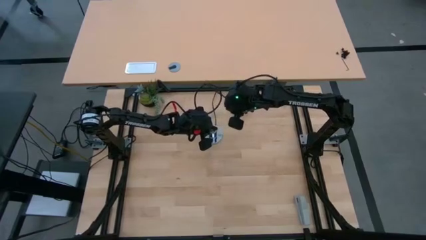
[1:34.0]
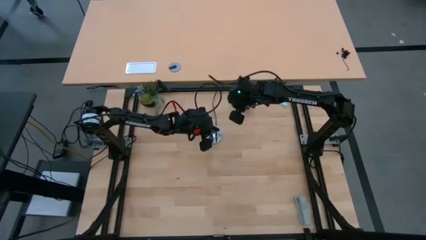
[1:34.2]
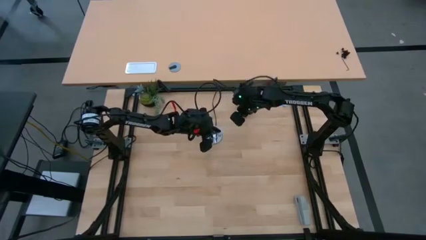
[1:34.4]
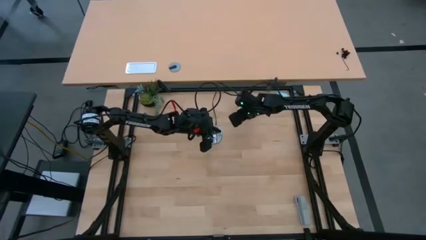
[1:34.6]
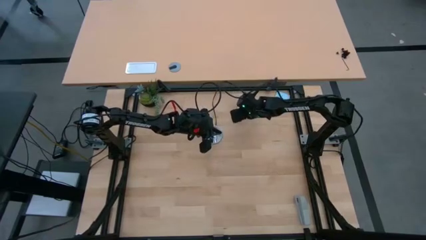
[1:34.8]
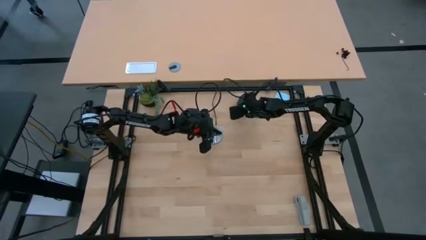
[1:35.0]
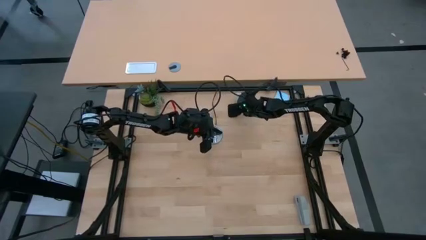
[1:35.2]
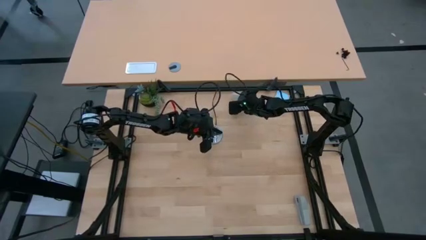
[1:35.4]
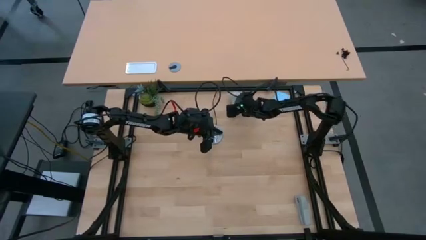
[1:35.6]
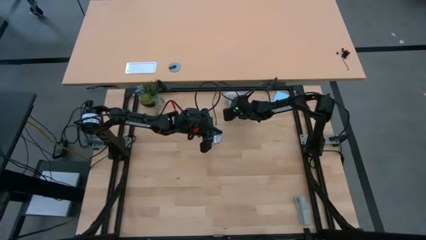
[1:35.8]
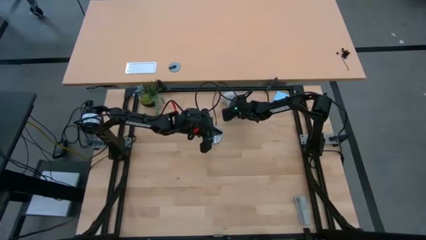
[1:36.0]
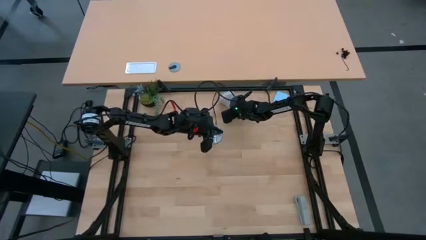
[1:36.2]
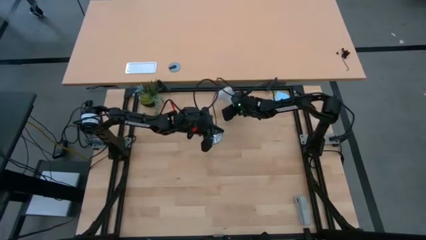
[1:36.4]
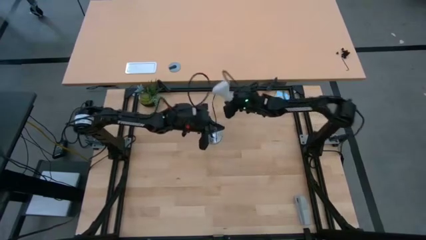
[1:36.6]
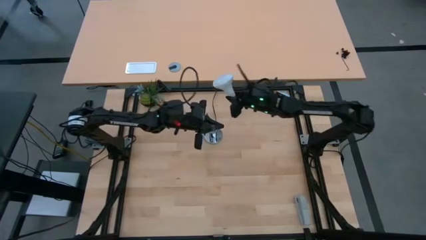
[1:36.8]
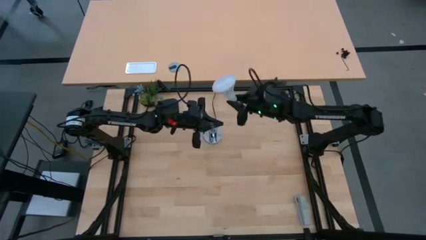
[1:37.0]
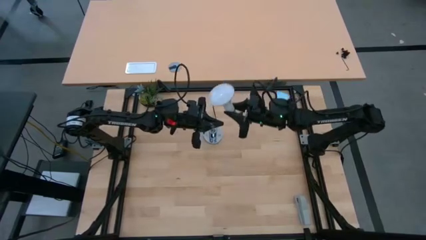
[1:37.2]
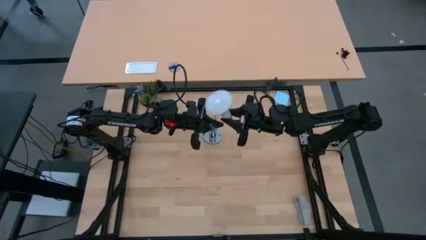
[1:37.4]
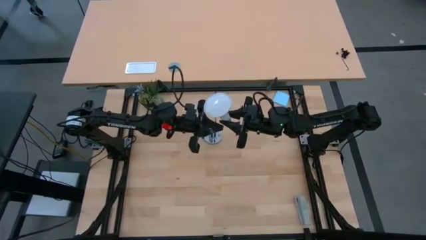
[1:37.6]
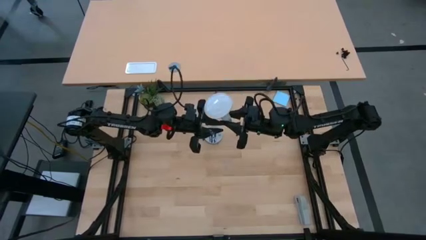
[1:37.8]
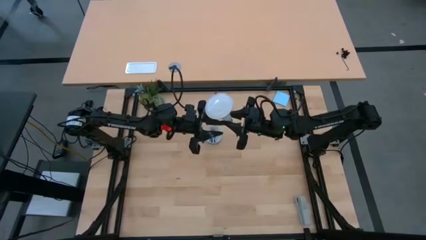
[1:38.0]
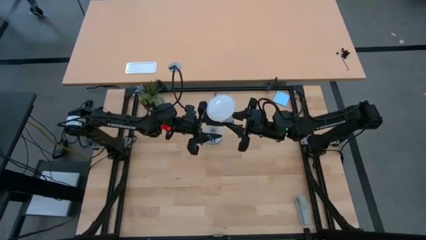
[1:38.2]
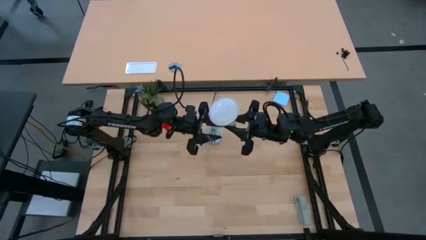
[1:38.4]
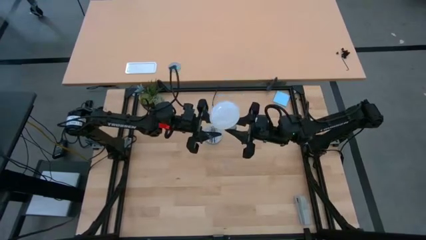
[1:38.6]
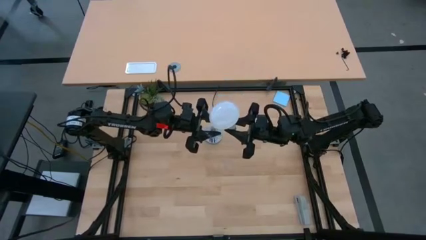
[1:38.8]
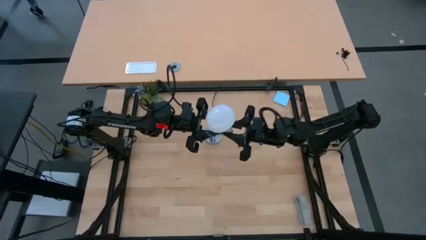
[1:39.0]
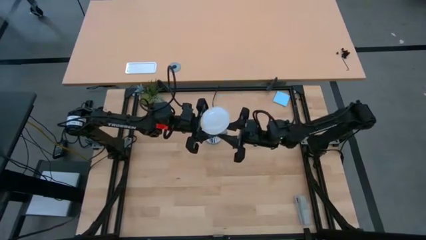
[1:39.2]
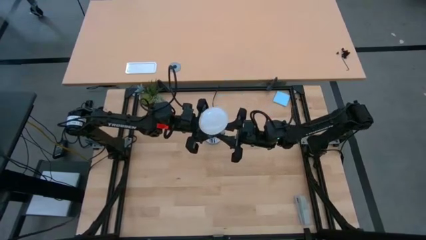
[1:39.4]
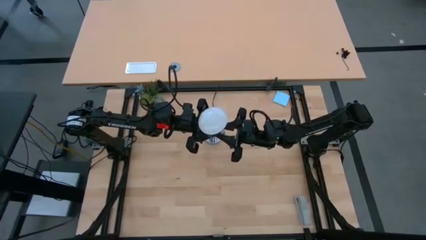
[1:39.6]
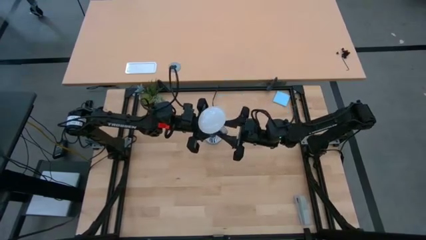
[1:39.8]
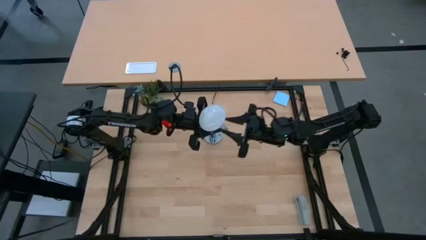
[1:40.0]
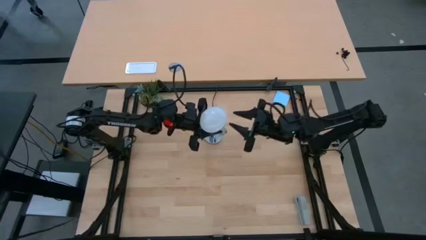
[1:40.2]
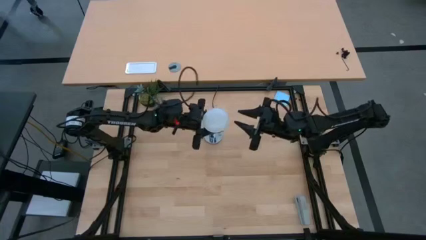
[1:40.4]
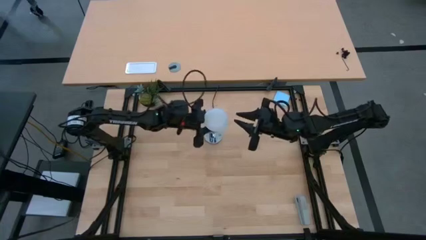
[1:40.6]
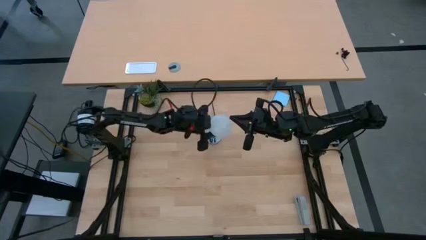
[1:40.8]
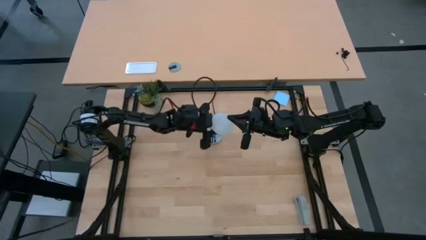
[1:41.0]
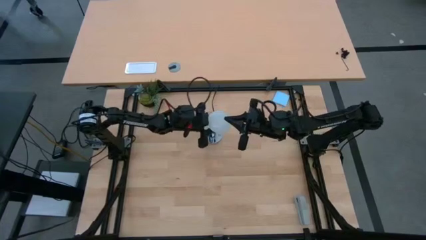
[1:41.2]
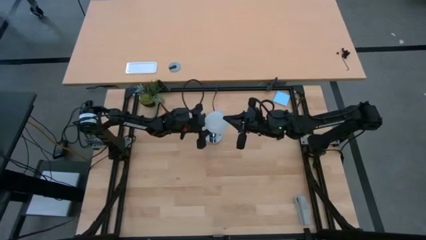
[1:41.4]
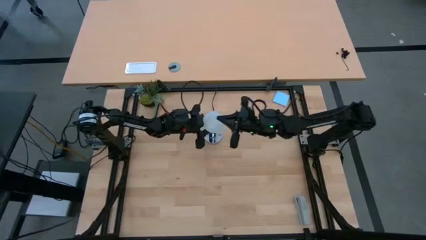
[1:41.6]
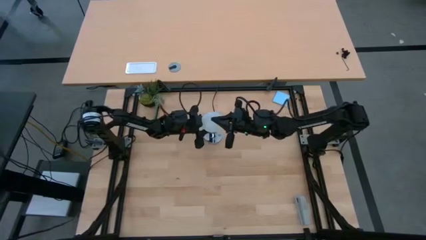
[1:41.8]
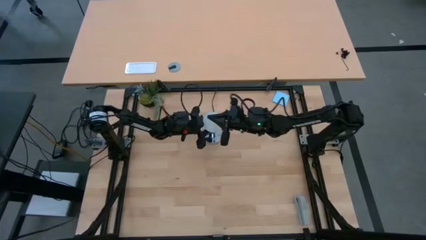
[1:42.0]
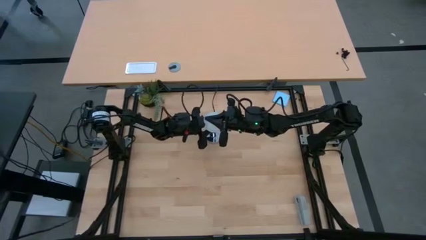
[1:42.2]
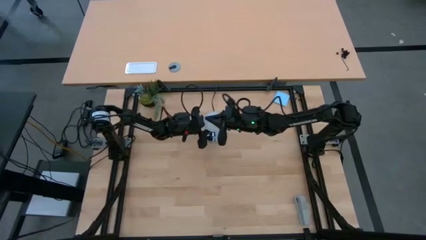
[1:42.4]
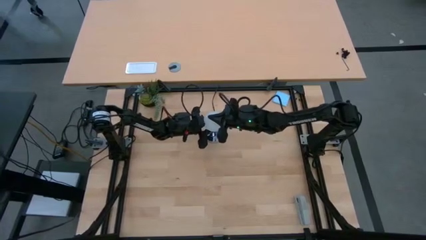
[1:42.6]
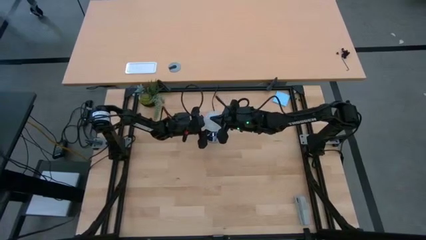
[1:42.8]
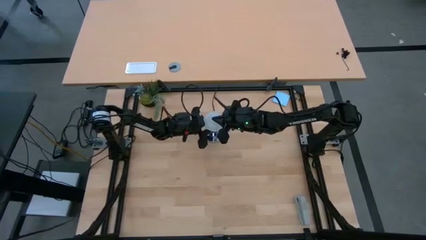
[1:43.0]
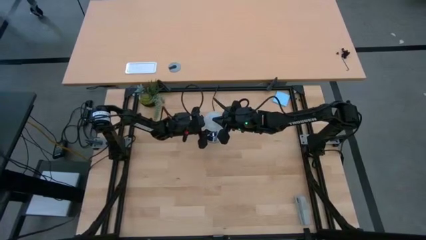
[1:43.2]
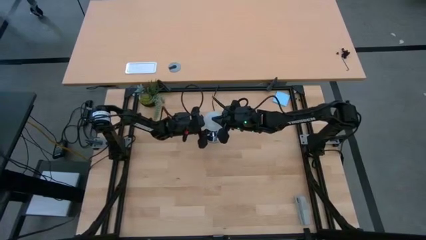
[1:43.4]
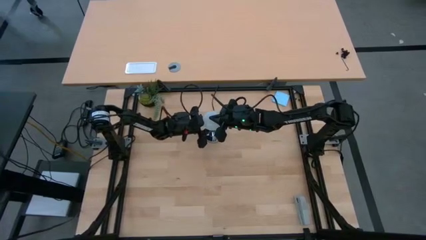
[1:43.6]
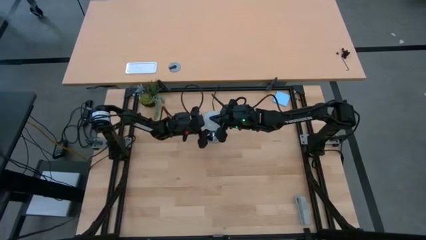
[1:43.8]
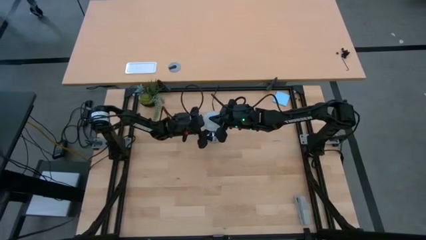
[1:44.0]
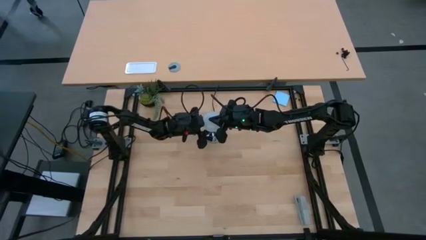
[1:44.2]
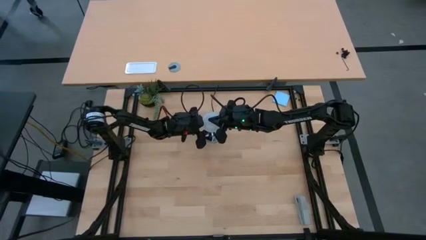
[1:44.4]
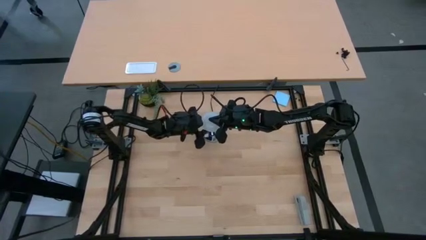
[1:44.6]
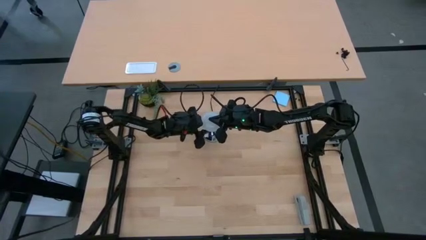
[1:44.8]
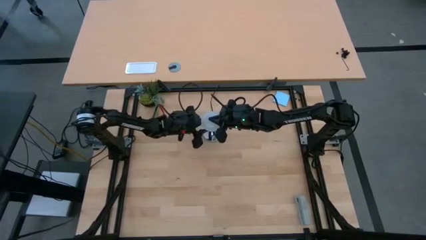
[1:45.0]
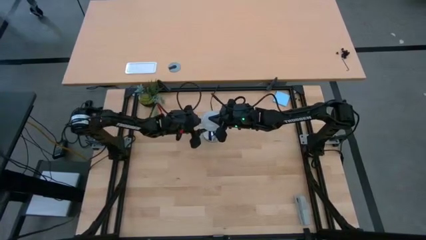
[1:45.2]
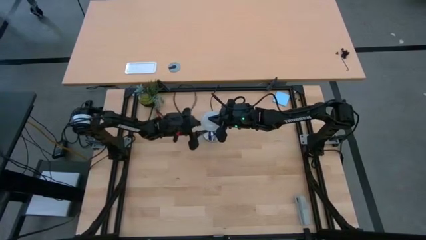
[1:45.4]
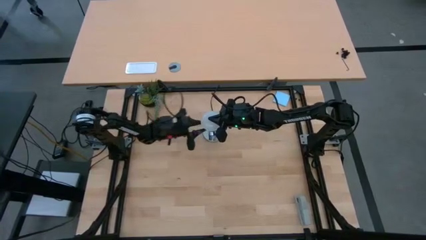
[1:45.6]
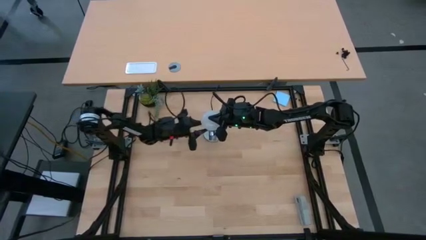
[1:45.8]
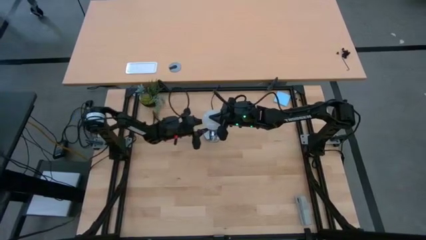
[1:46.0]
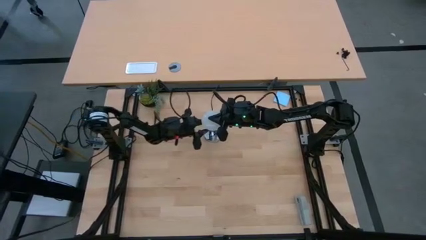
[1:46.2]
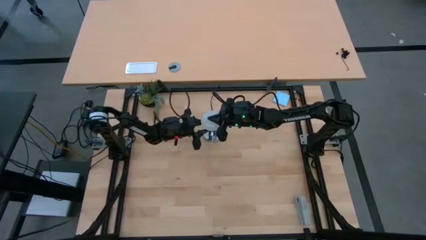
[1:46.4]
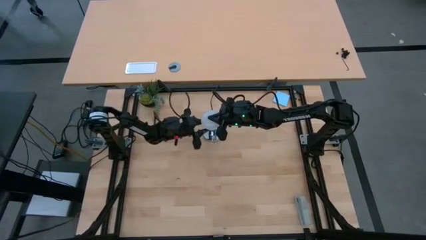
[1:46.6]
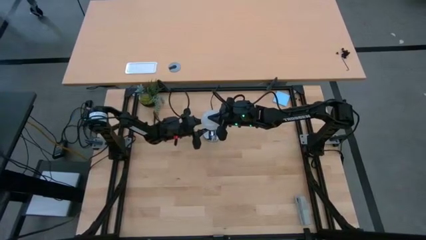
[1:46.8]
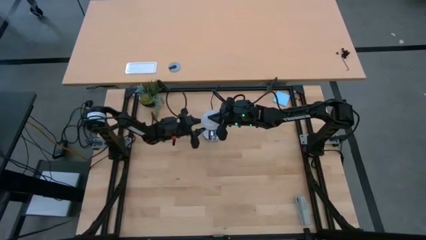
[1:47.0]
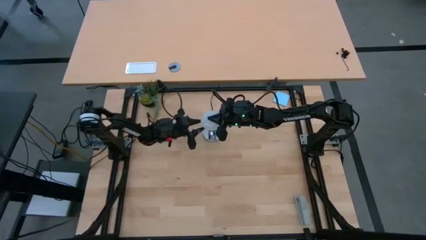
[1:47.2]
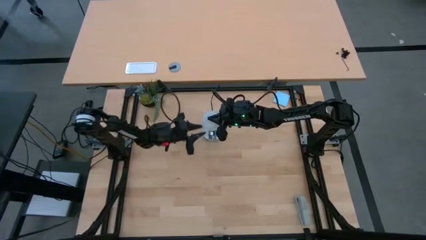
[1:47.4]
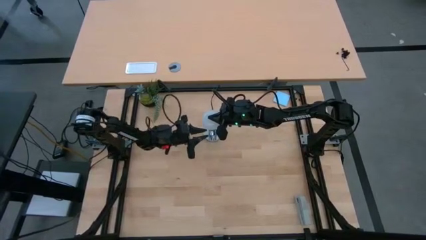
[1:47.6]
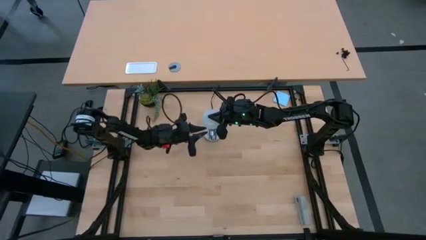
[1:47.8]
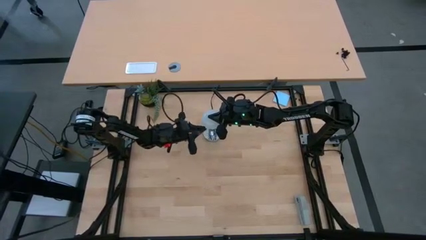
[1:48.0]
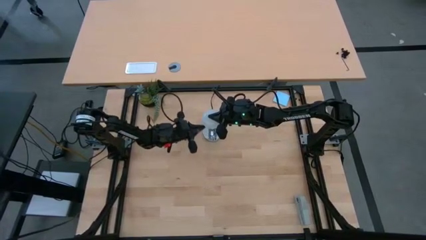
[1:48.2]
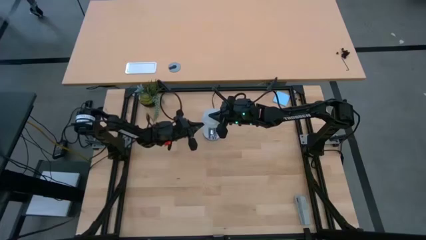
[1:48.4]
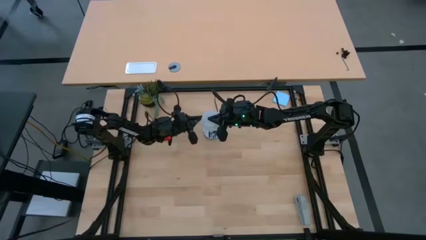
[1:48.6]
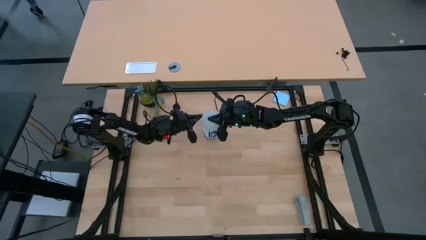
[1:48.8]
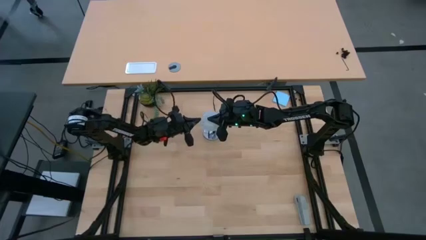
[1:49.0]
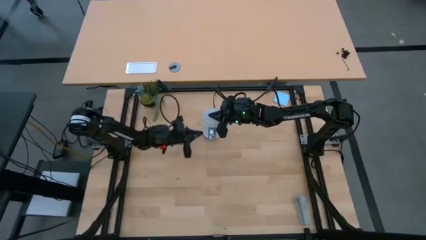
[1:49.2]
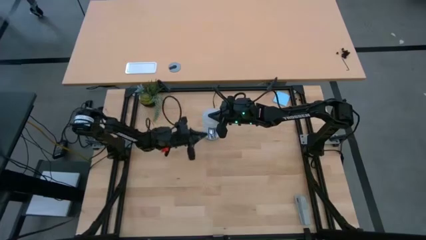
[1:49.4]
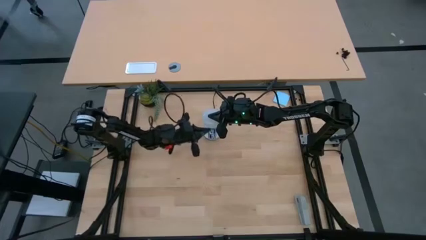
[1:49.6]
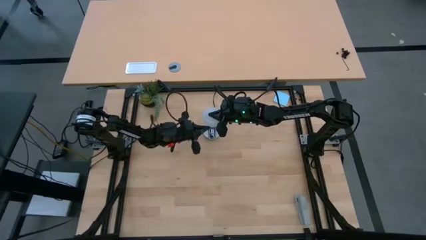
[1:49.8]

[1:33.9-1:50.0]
Task: Screw lightbulb
Insert the white lightbulb into the desk lamp
